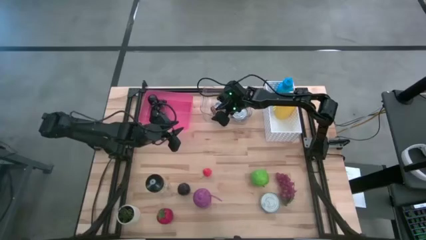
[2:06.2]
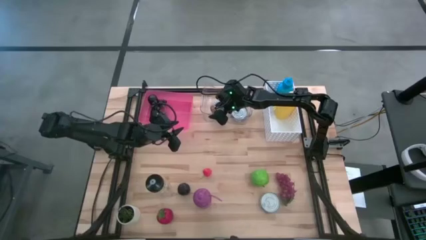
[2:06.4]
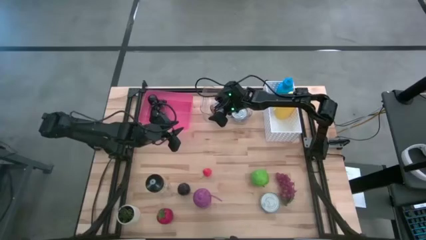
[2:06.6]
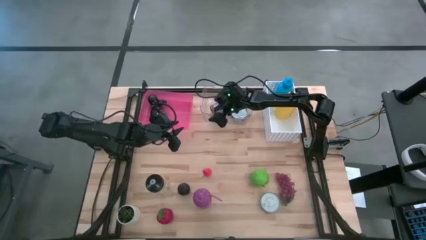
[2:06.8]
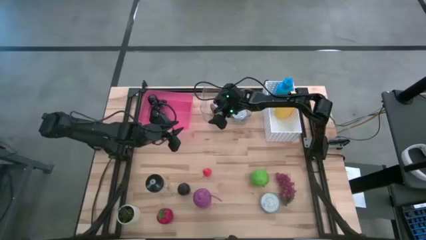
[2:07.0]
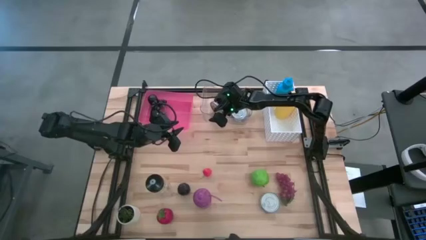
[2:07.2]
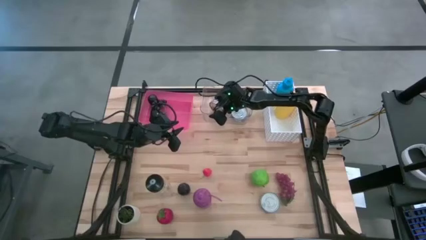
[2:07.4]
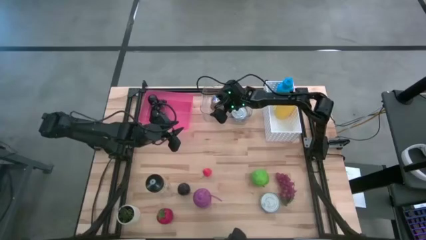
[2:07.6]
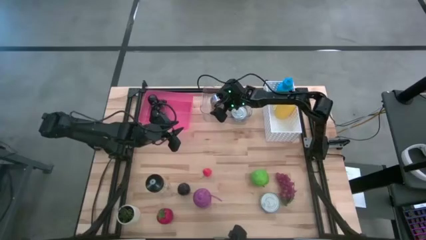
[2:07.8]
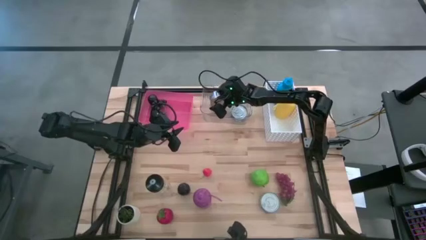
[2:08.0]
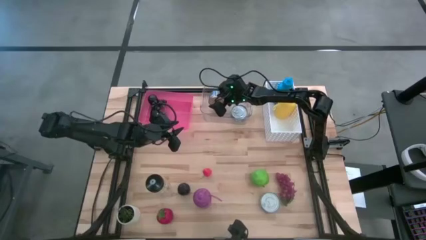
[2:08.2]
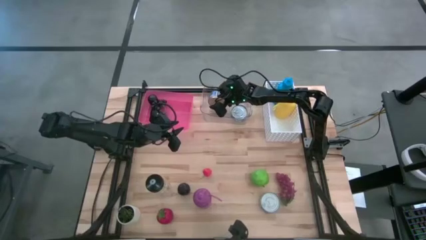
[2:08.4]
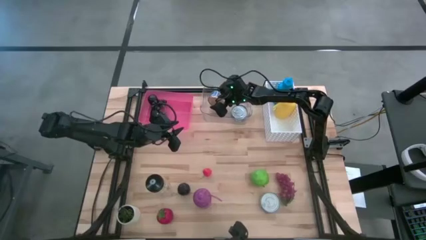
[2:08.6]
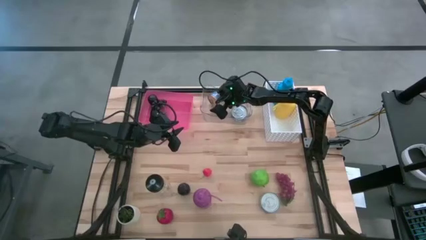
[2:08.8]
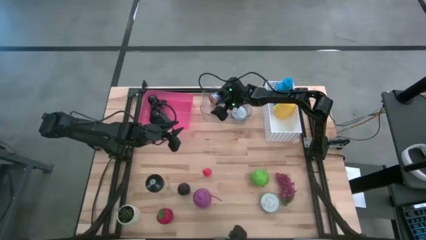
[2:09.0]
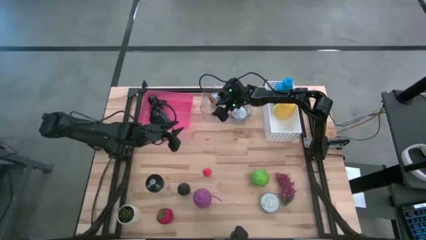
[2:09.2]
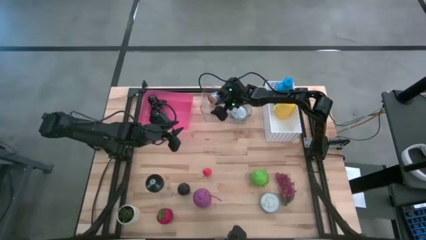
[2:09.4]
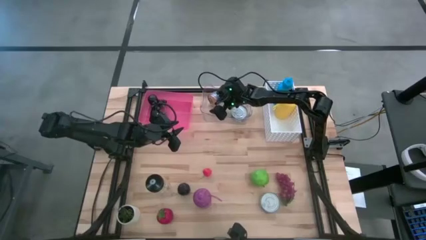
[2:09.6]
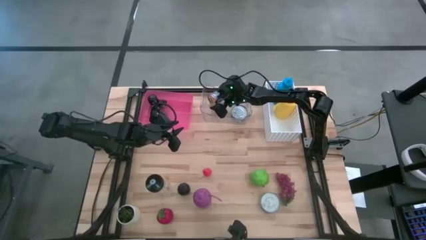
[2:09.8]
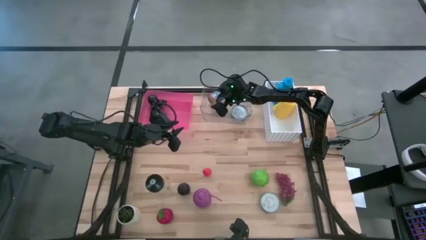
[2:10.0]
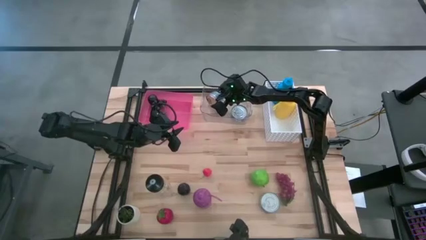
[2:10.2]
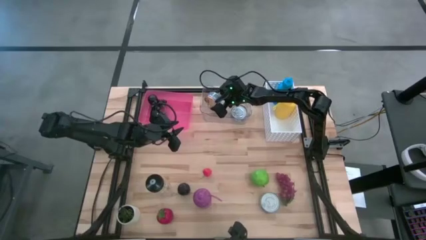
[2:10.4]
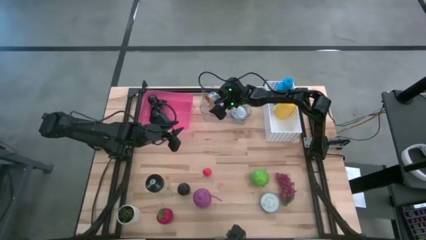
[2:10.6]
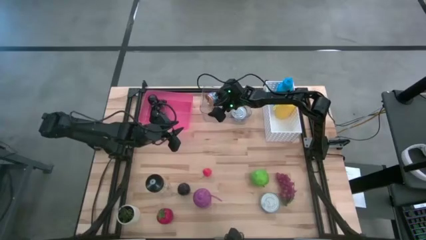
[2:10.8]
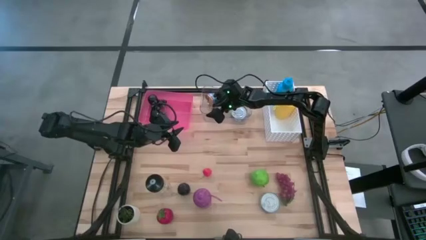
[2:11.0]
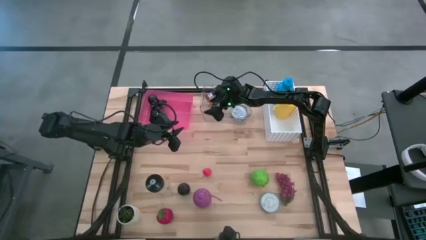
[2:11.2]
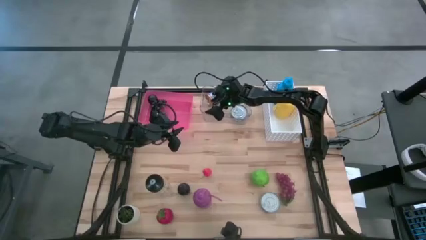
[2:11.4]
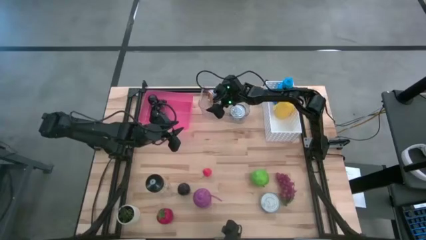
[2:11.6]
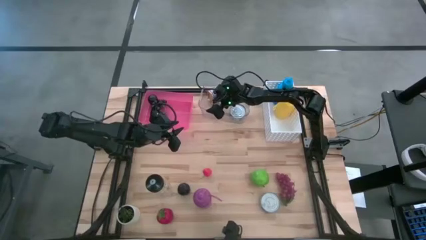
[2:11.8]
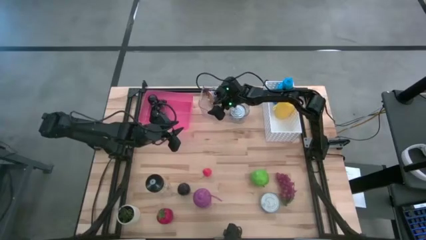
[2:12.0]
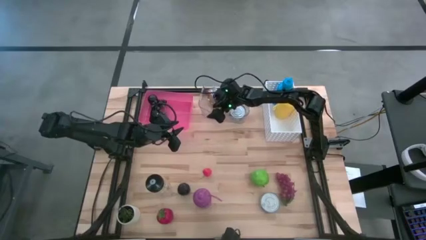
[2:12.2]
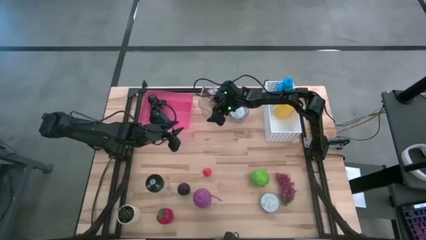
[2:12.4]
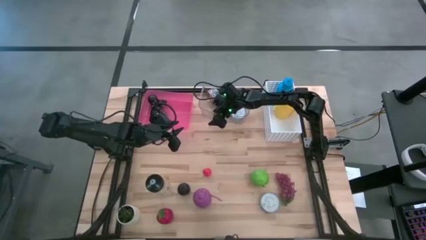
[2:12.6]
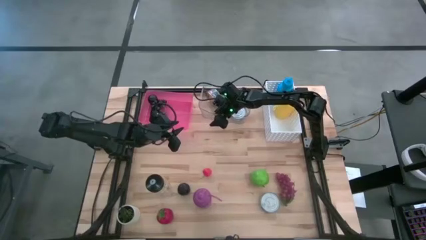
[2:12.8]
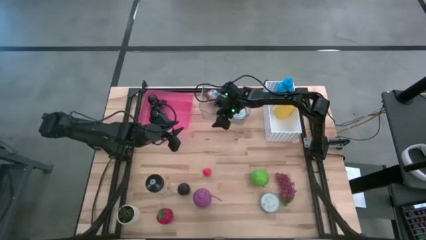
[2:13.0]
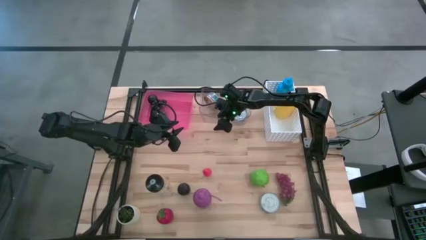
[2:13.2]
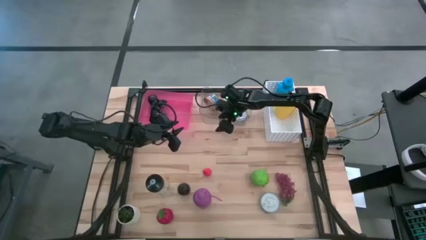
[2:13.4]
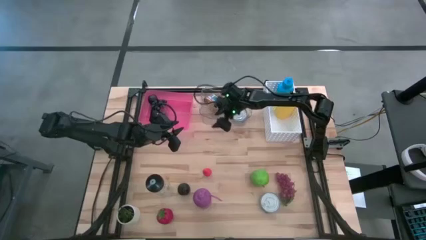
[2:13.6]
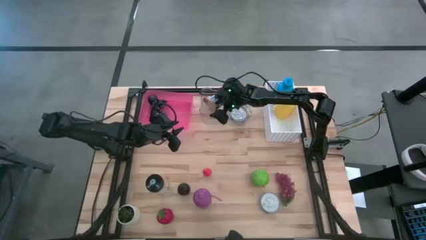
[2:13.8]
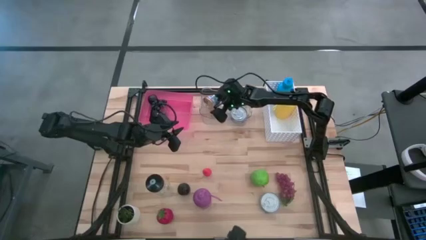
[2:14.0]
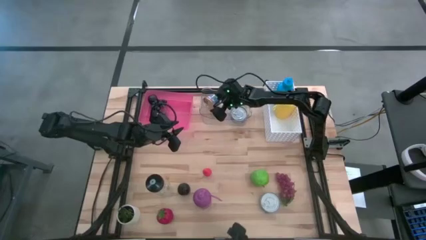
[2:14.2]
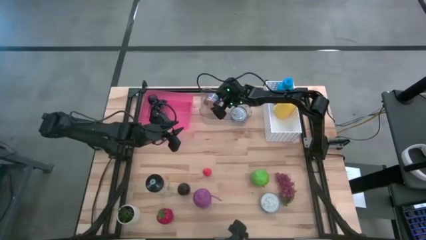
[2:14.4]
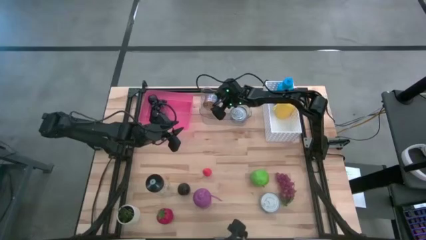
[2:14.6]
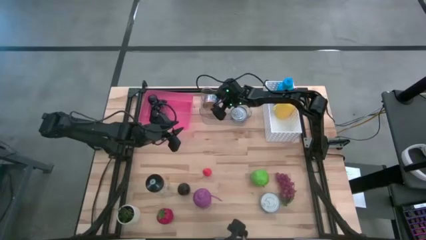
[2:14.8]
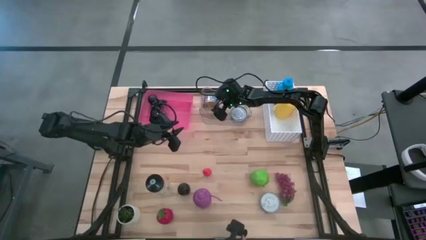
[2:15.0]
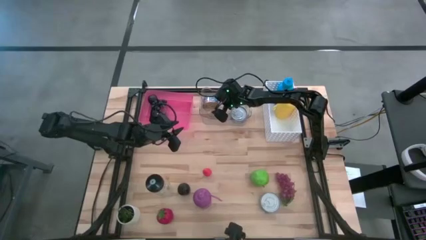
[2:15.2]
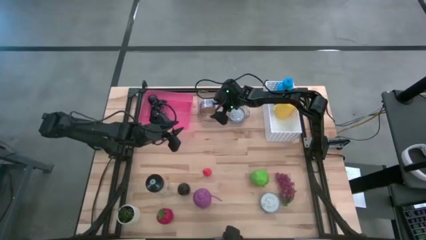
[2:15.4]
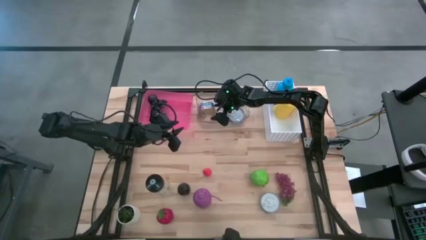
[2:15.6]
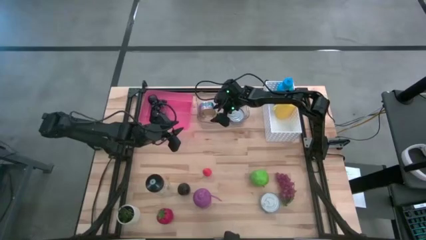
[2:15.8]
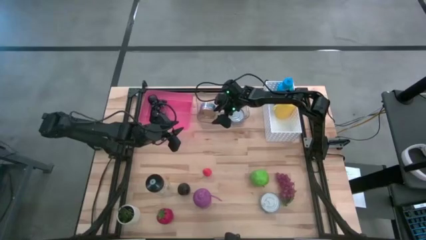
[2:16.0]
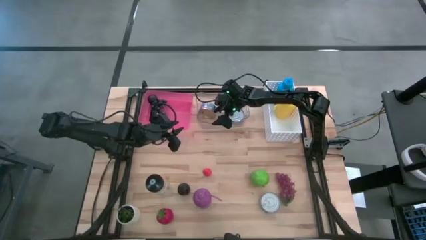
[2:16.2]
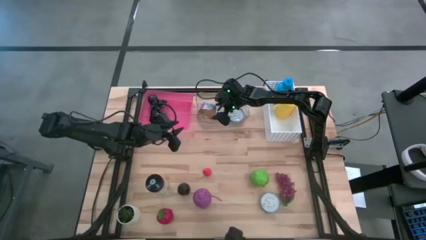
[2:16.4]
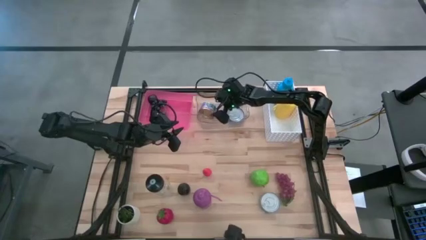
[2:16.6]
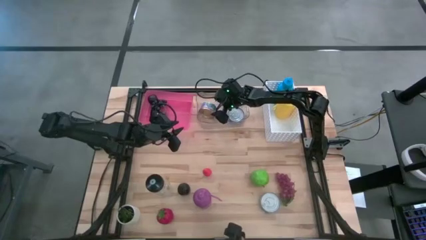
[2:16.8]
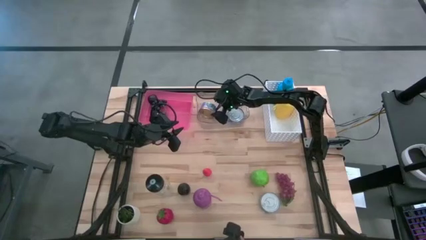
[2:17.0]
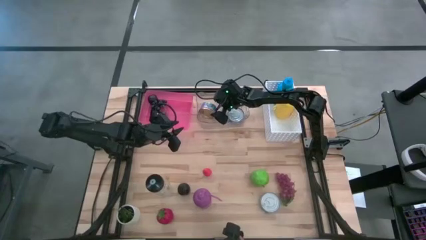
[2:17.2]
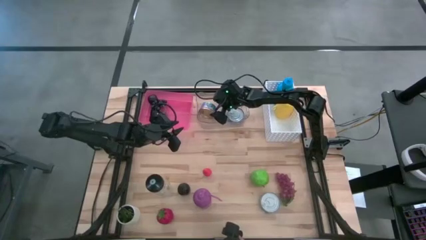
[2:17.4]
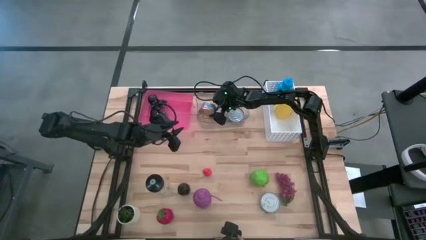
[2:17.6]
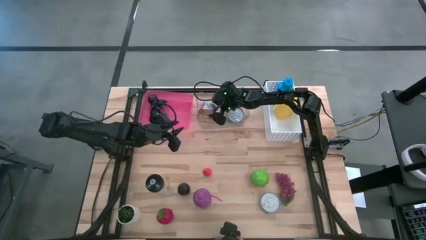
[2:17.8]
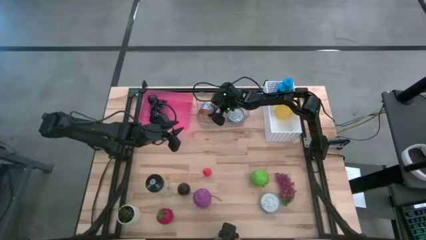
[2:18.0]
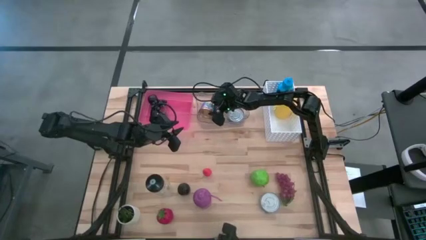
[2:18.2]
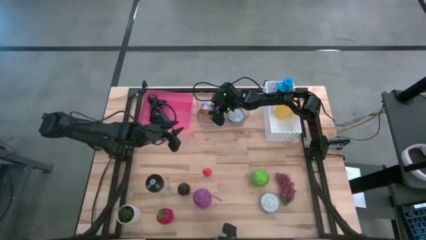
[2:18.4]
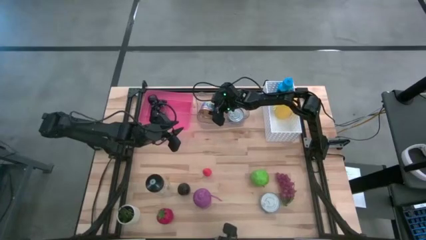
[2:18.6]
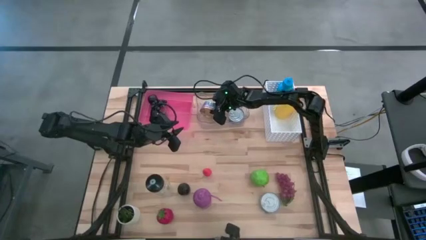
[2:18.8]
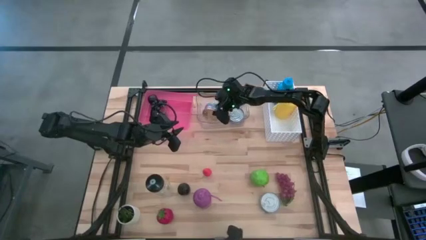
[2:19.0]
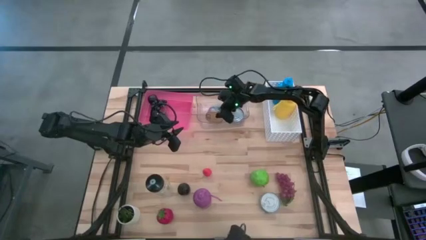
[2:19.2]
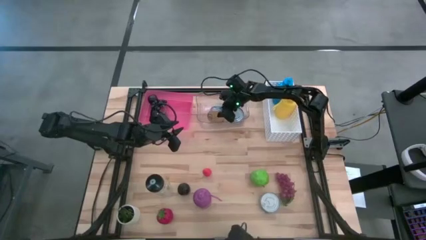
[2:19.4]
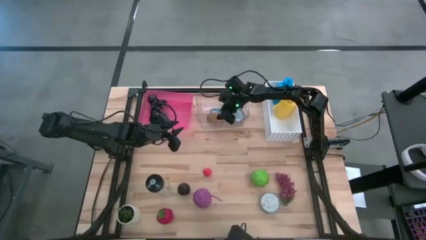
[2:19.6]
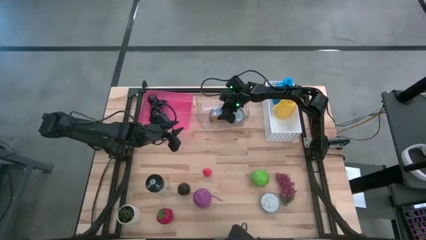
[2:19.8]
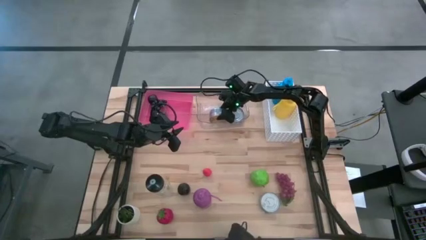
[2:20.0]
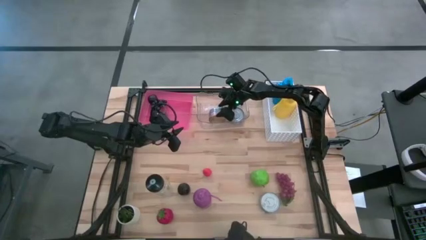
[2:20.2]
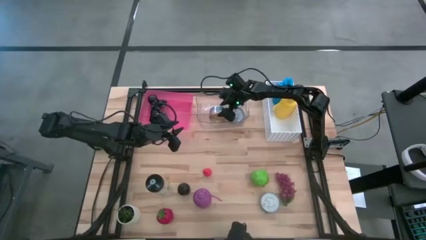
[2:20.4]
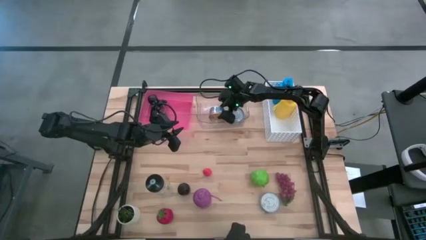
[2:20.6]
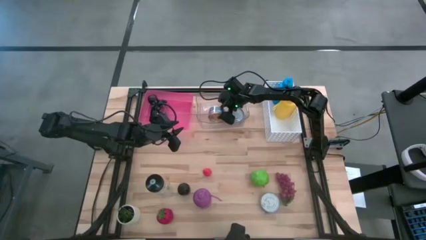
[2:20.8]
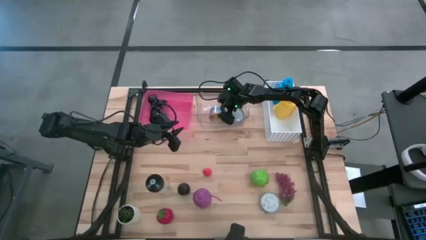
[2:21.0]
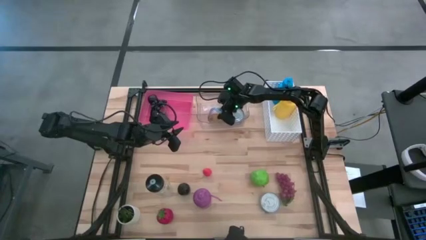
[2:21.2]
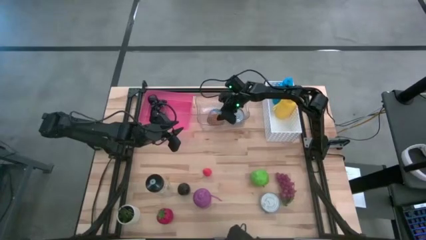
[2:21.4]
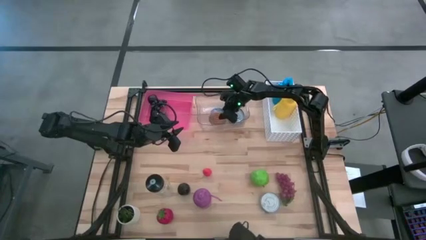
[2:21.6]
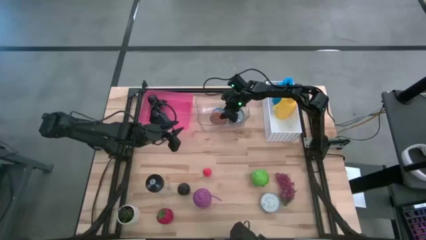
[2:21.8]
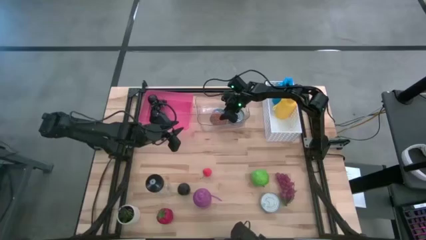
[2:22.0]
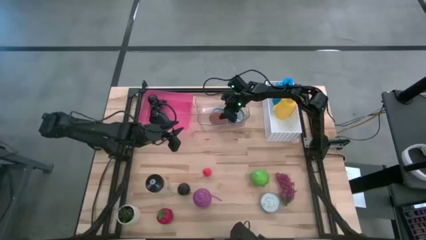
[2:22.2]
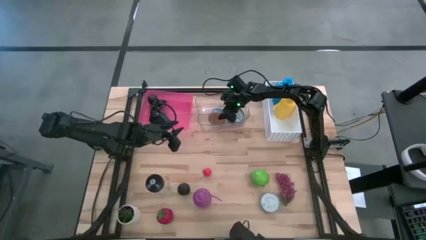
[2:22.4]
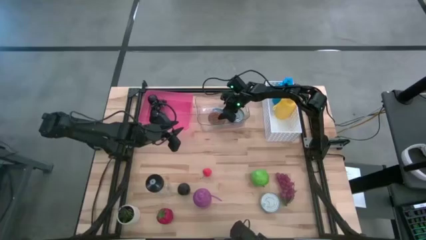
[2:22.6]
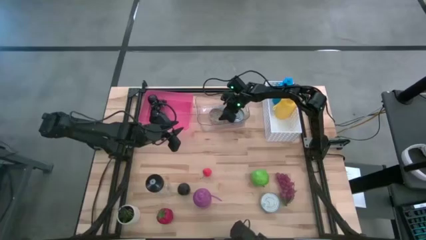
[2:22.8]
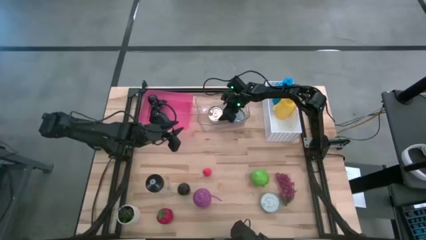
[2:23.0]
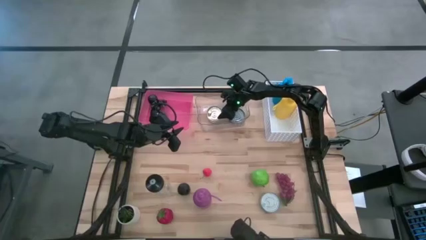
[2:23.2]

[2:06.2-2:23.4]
Task: Pick & Place Food Item
Put the blue red tuna can into the transparent bin
